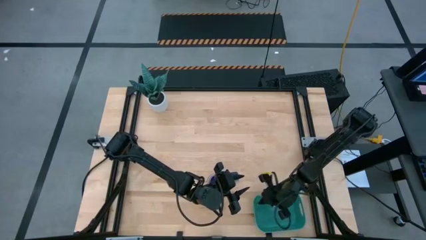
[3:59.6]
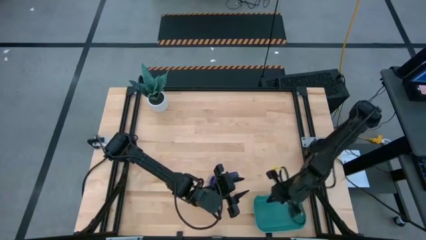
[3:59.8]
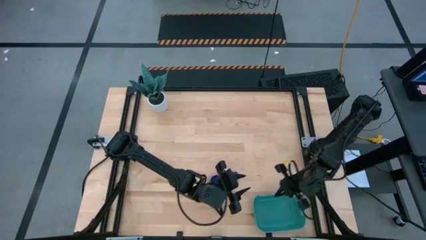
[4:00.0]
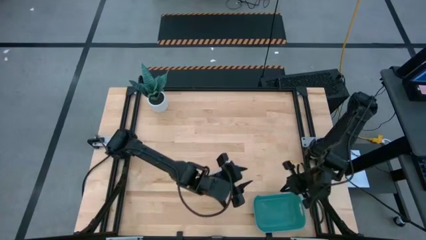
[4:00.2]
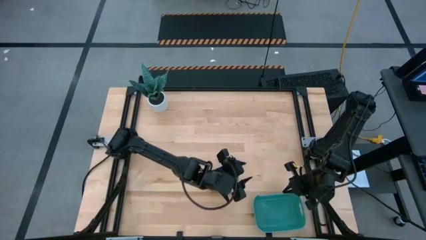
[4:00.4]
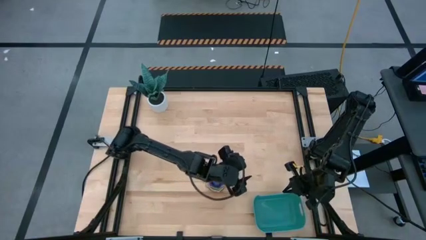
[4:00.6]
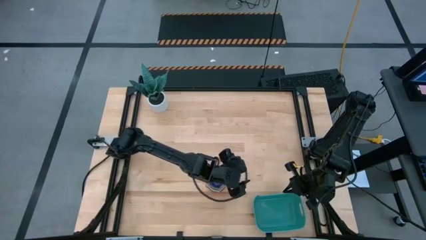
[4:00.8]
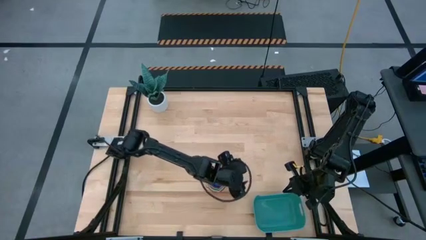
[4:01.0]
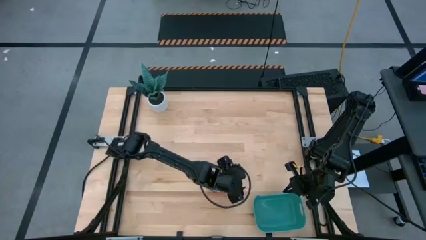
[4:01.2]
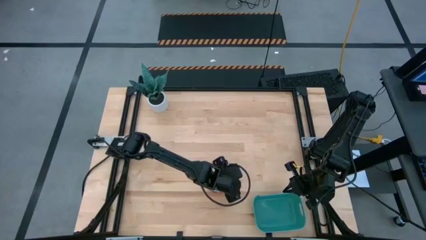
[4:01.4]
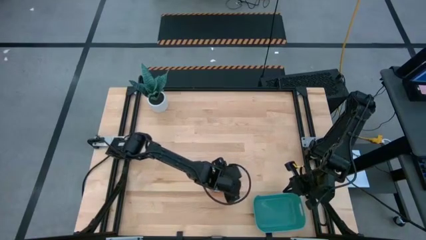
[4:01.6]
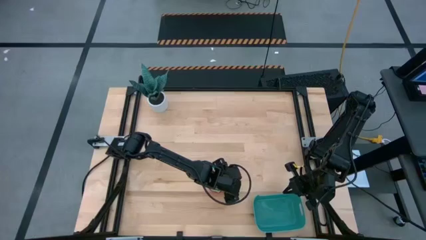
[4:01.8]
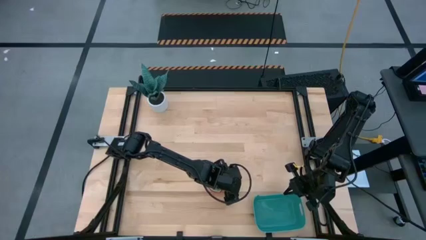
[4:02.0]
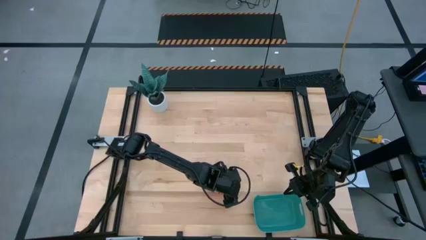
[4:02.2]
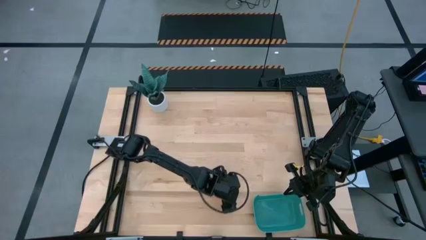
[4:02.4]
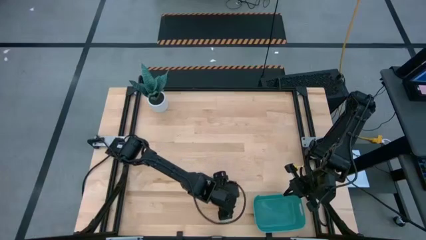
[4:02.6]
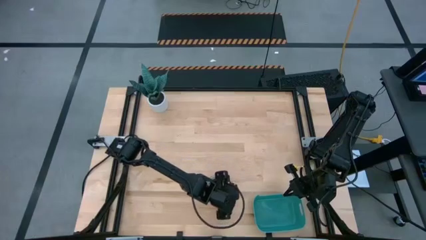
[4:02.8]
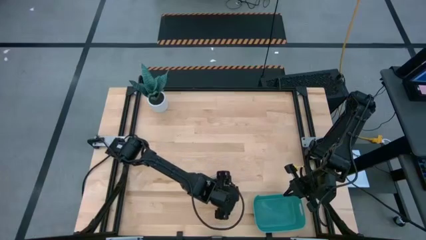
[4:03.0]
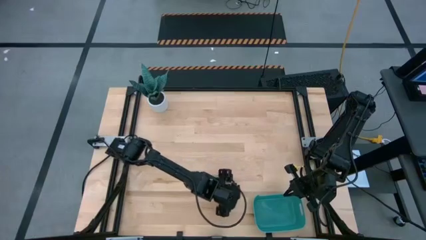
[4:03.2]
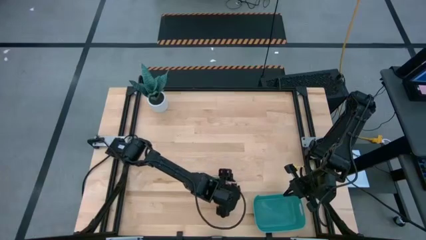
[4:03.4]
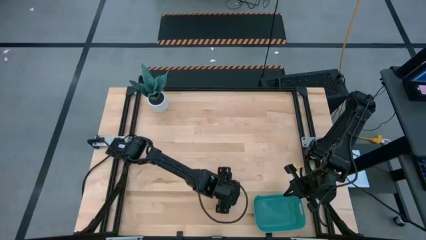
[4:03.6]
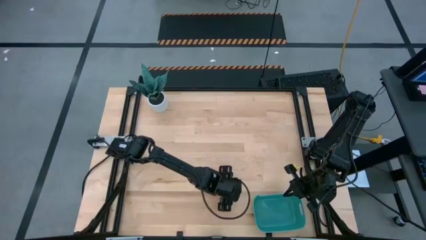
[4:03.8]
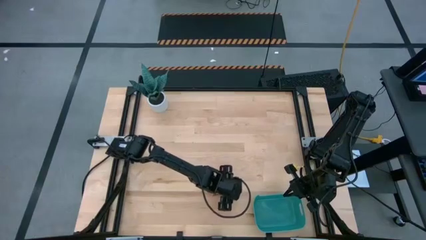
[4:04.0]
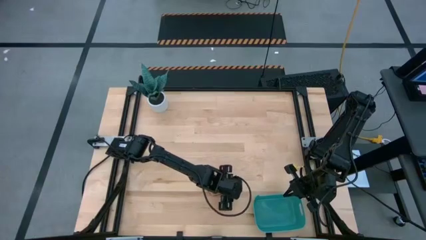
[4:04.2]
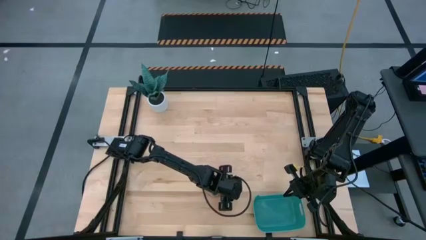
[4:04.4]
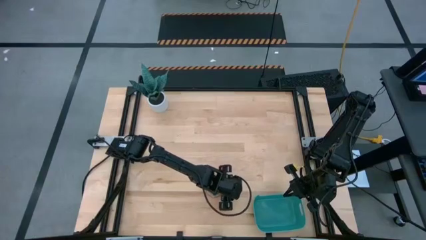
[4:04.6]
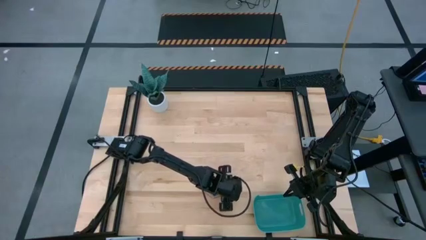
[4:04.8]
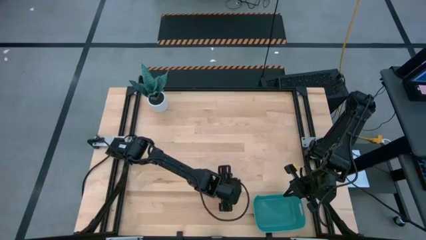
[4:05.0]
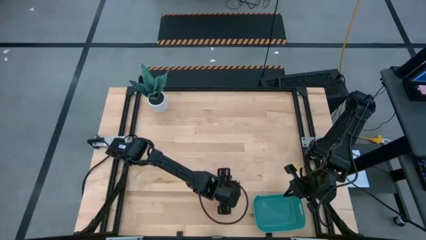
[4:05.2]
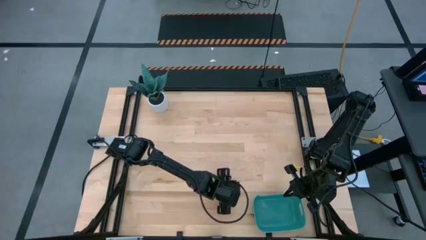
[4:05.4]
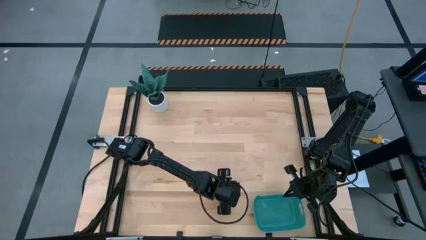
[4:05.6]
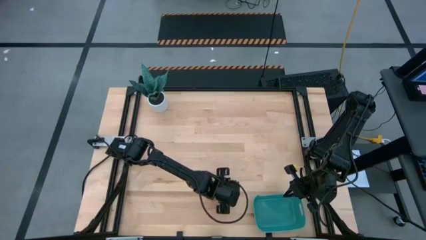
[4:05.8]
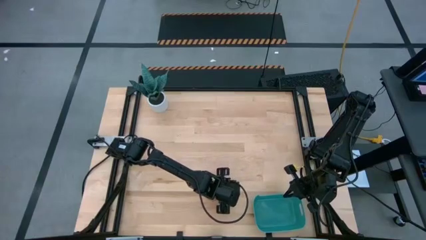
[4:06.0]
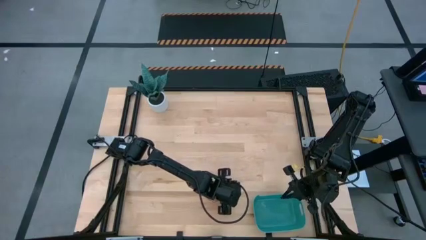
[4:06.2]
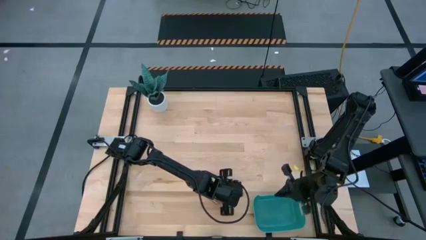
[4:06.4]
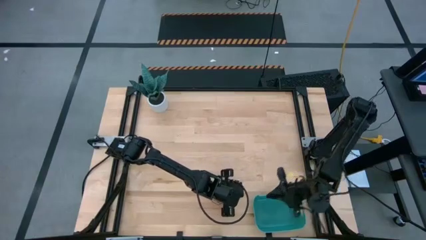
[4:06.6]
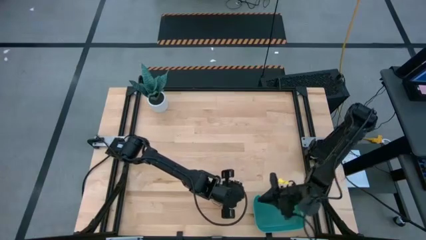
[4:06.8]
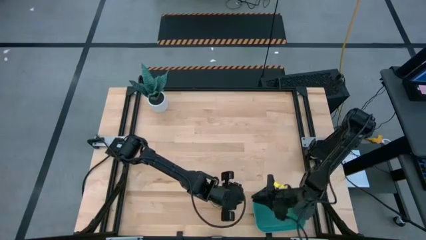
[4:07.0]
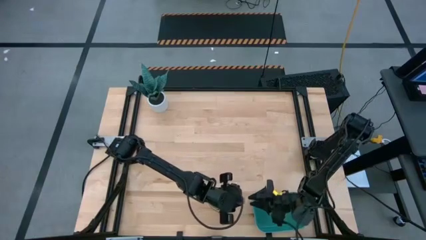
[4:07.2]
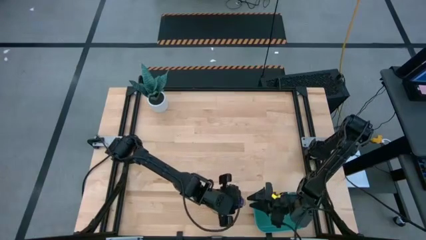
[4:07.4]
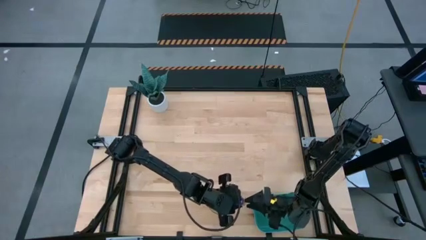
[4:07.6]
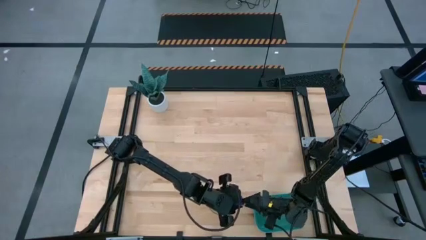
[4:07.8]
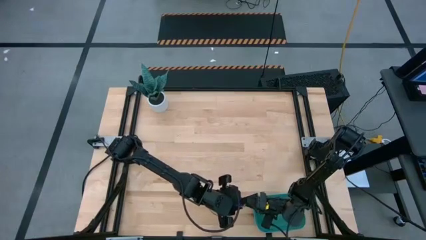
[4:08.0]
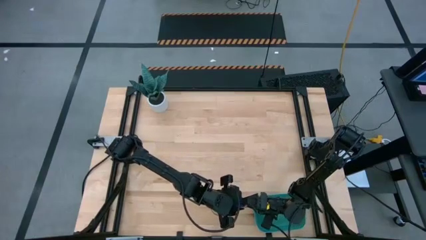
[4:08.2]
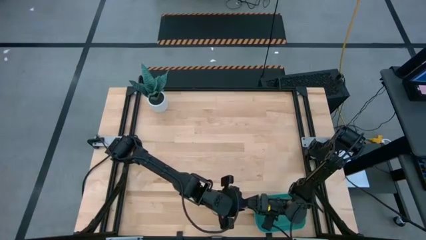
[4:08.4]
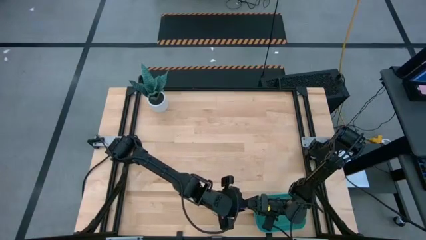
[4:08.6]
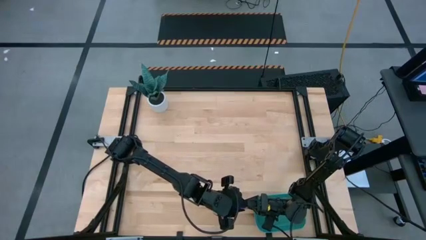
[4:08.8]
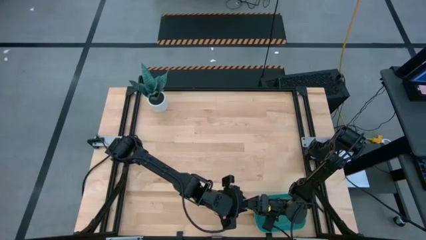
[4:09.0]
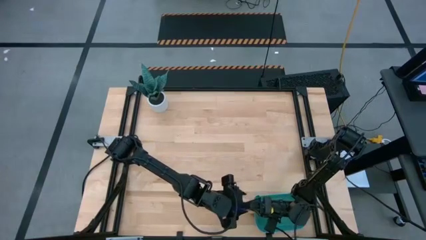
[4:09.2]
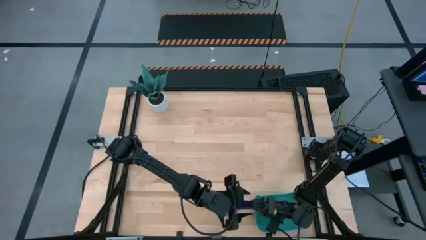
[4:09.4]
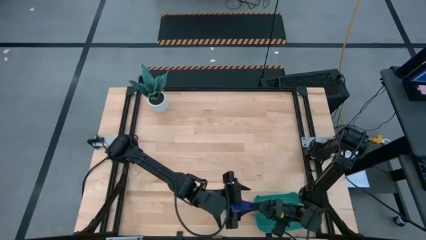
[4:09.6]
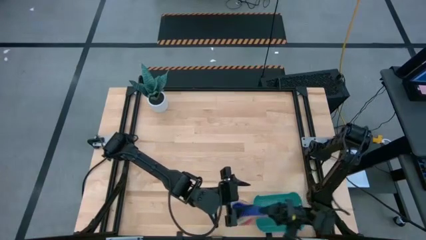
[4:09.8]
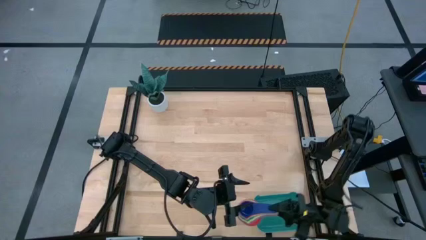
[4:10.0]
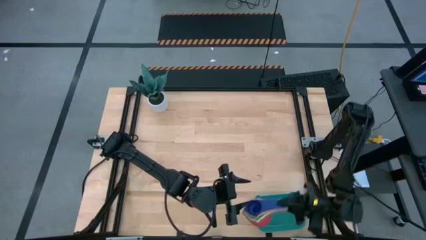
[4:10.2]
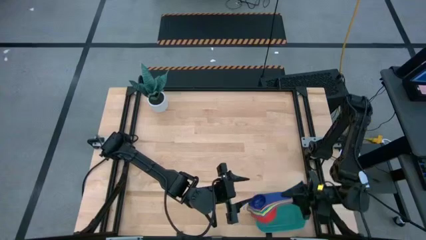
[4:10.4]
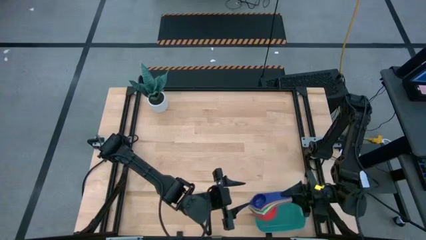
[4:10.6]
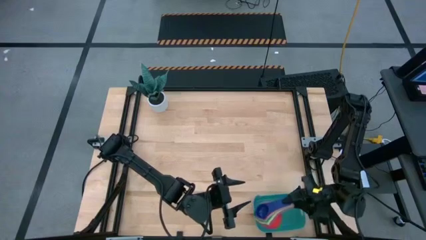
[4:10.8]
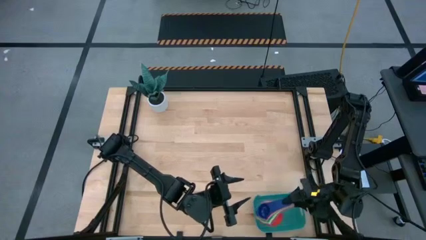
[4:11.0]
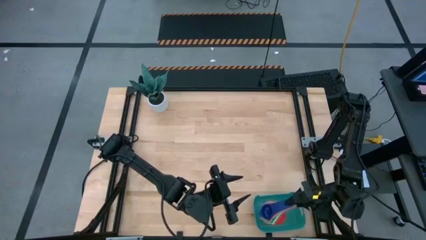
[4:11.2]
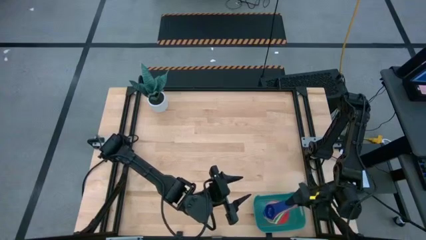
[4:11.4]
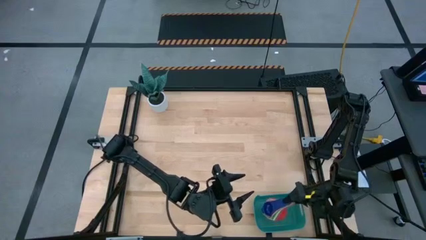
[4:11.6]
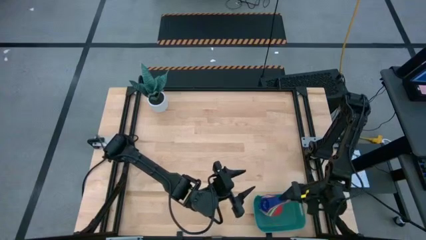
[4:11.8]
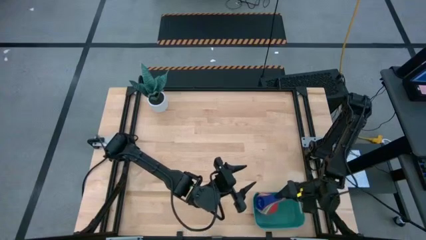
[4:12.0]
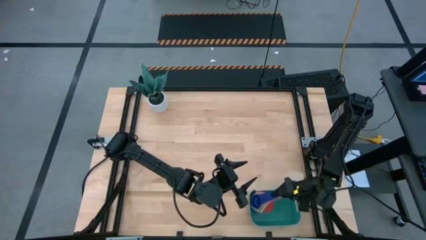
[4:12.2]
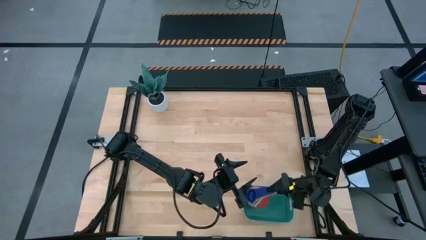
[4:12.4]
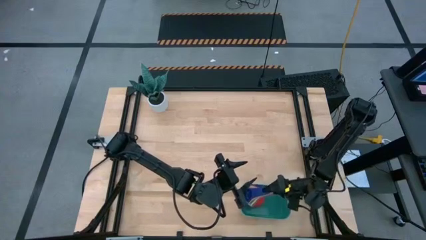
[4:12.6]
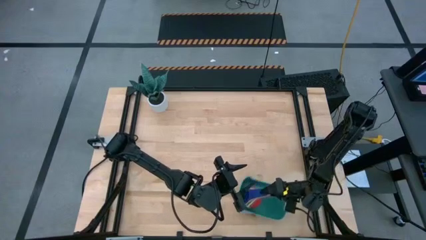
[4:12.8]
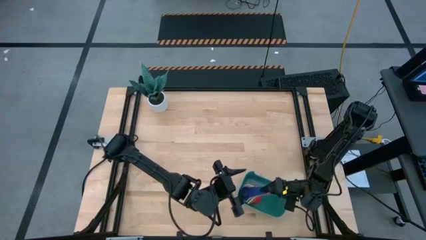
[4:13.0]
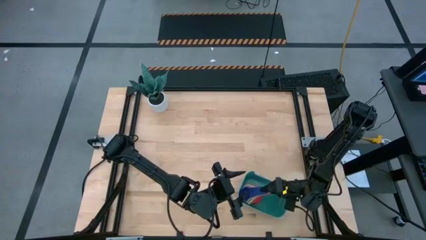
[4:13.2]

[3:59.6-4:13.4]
Task: Nest measuring cups in basket
Put the nested measuring cups into the green bin

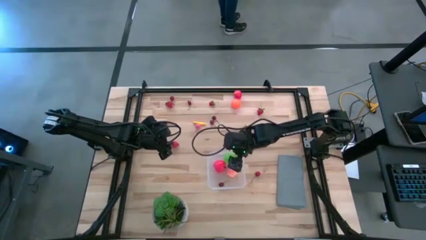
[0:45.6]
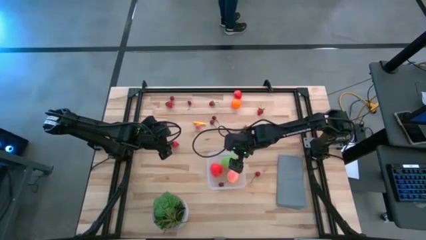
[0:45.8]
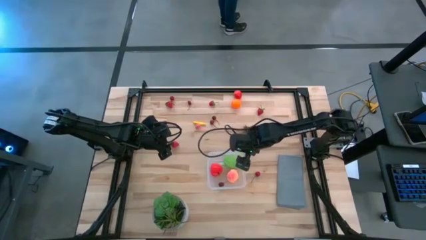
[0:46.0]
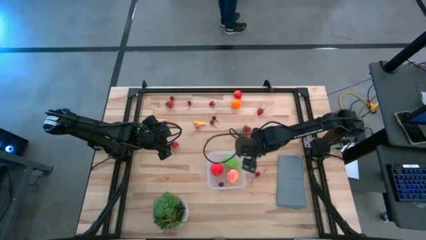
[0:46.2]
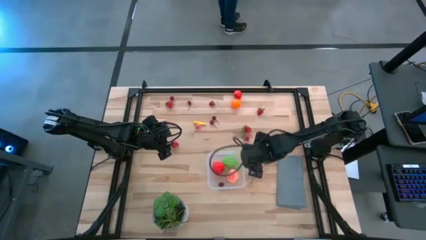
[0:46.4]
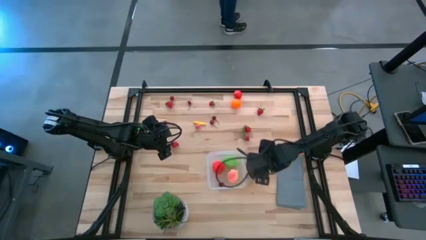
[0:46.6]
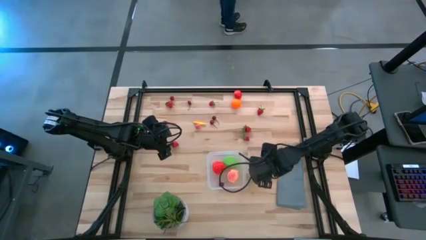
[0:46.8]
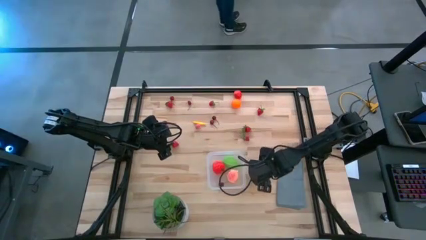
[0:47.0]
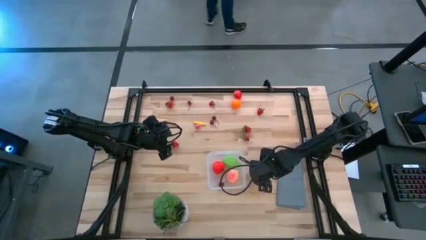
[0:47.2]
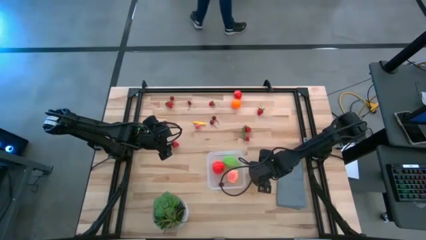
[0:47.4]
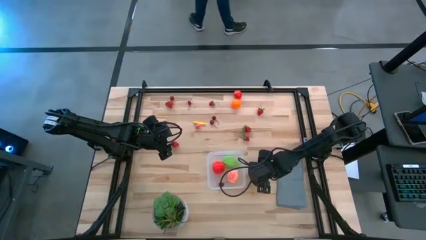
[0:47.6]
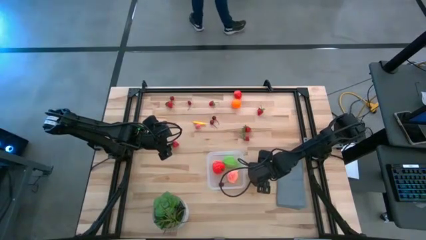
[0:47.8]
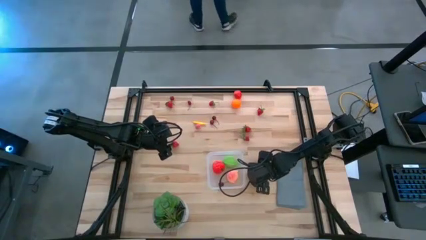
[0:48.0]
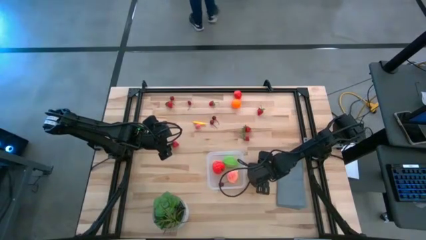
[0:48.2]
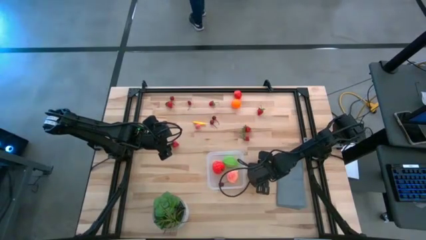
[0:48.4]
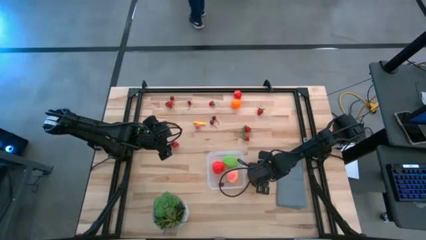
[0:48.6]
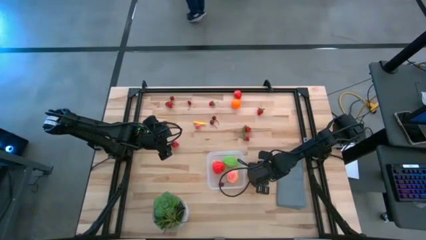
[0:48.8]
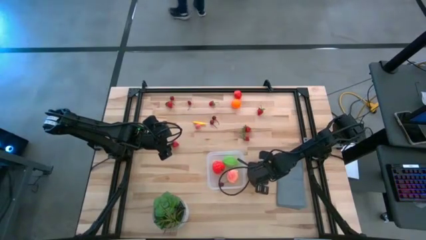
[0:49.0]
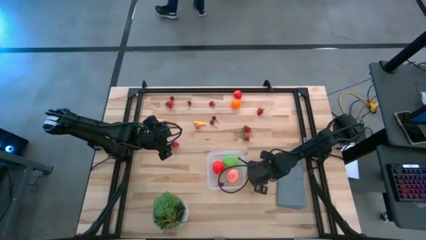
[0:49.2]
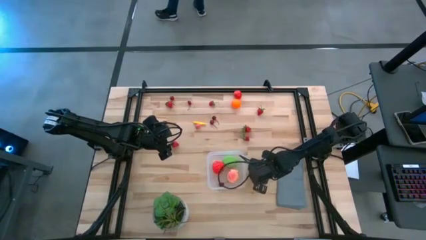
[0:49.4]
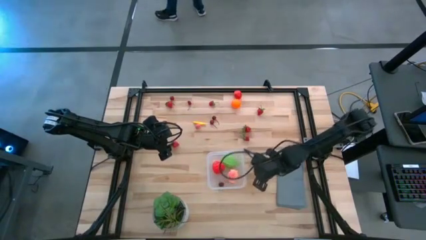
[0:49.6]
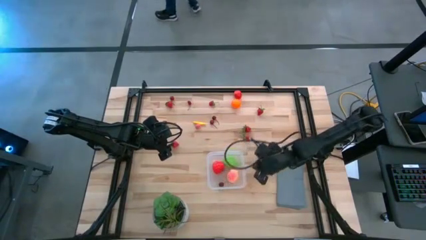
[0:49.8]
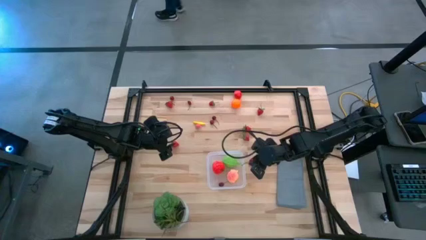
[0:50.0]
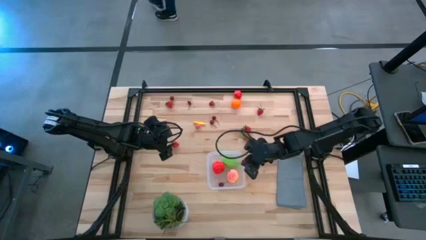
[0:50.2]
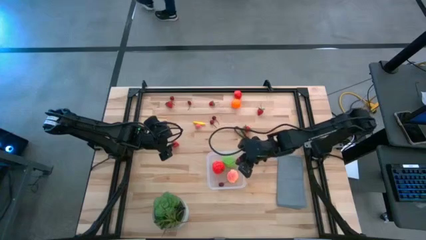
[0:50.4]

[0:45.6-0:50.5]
Task: Pick and placing Produce into tupperware
Put the red cherry into the transparent bin
